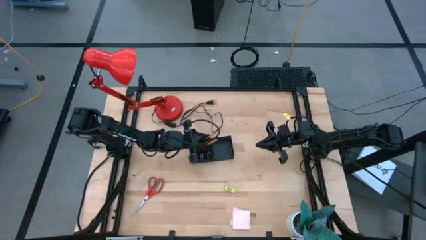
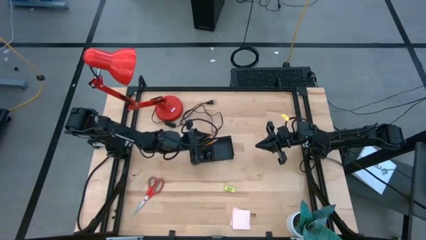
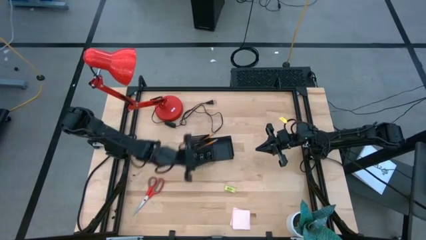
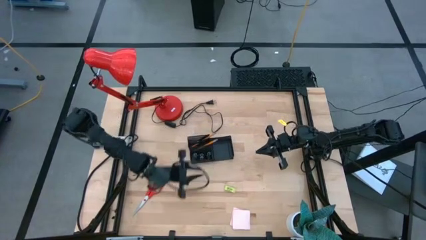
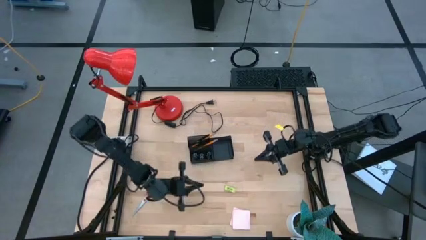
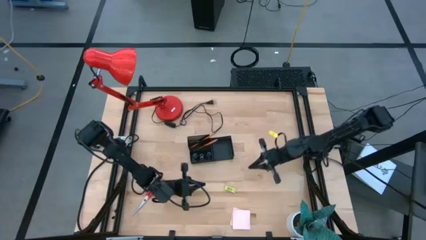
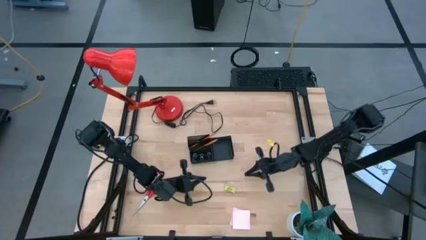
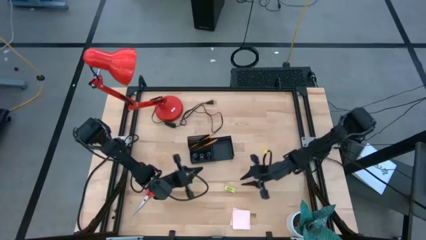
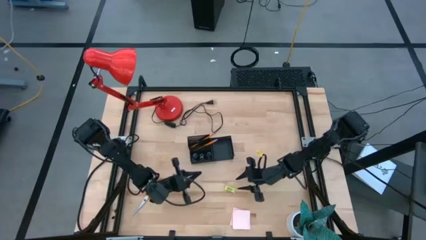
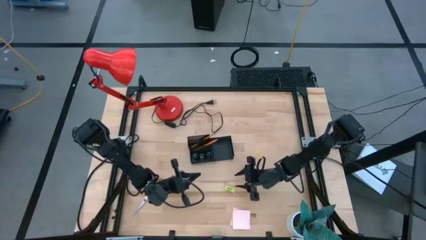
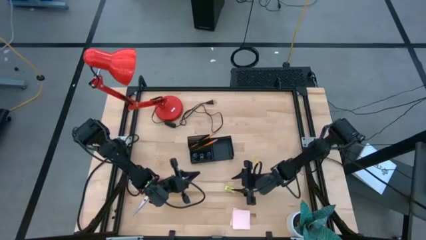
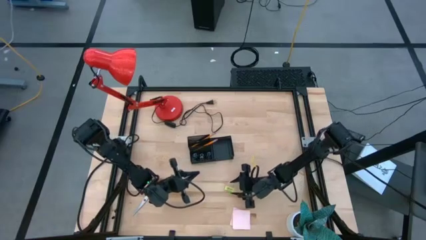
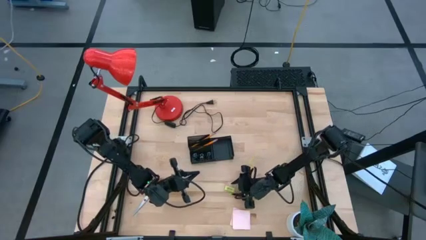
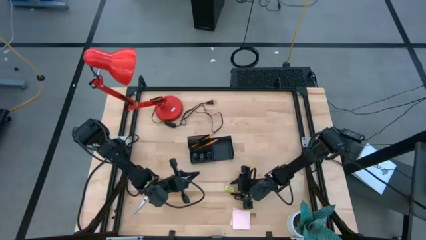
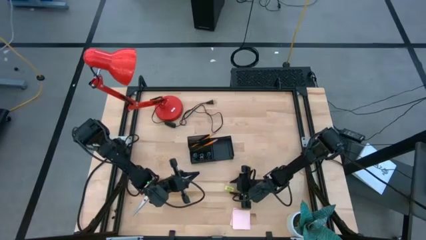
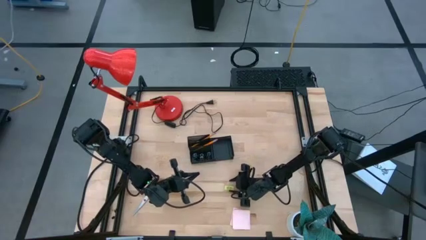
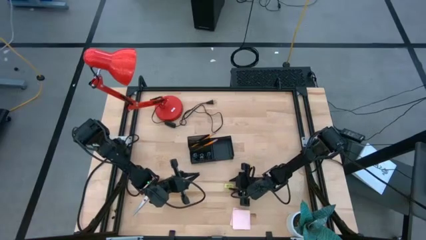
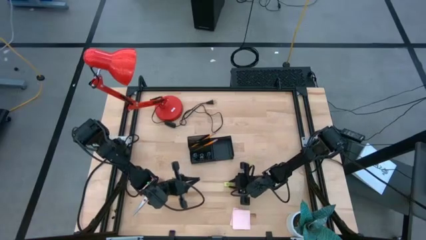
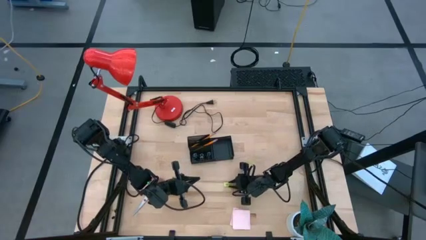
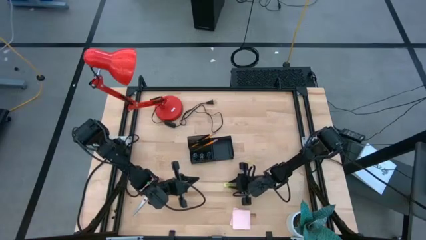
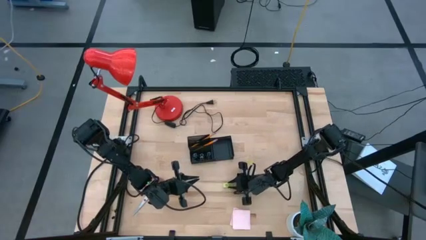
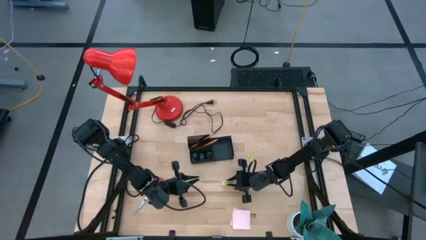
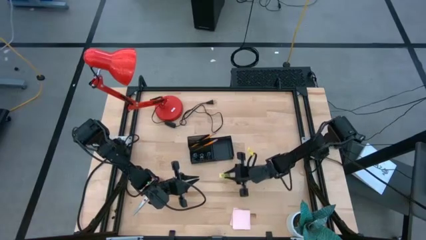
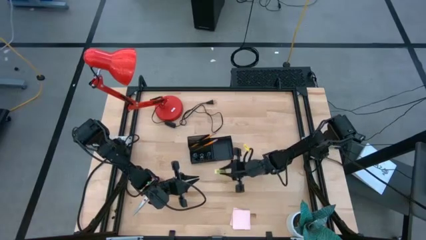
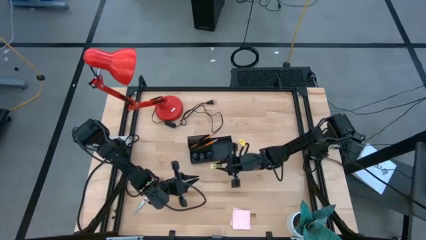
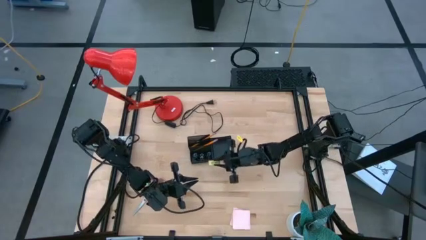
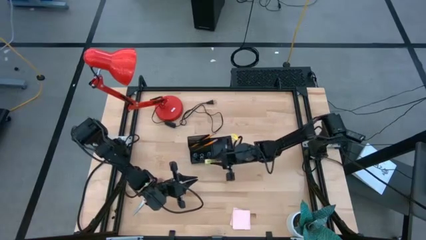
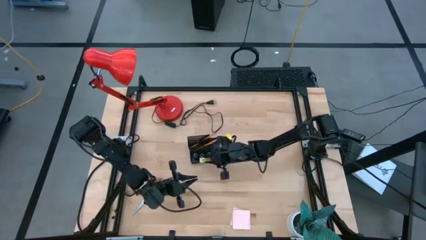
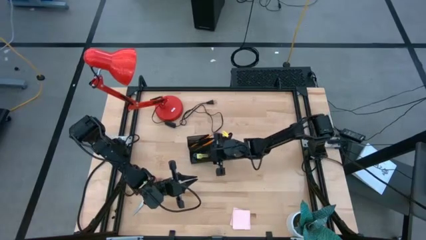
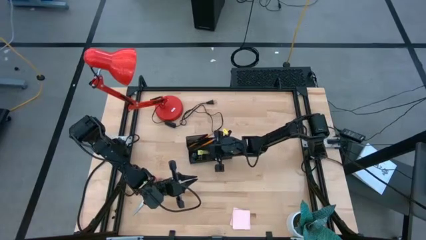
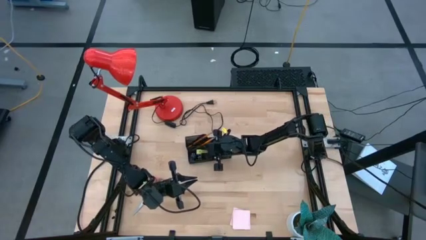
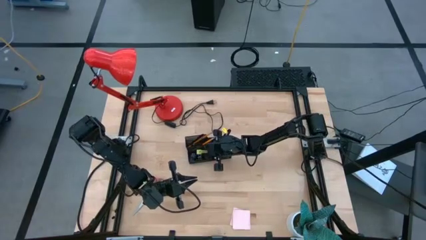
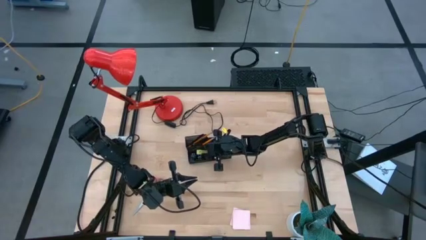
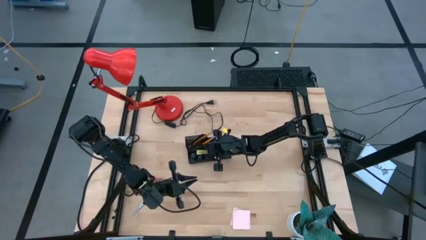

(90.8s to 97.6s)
Task: Pick and place office supplies into organizer
Put the green eraser into the desk organizer

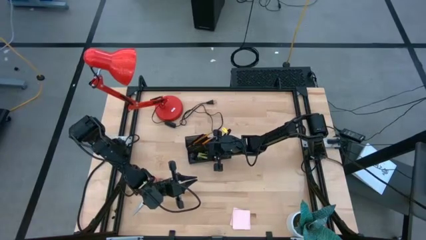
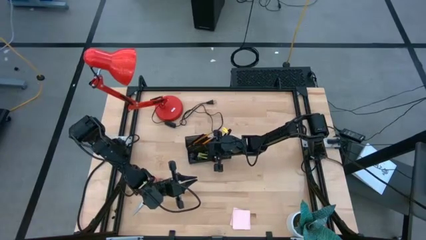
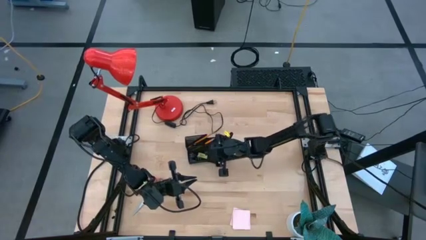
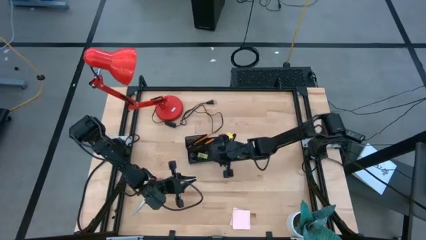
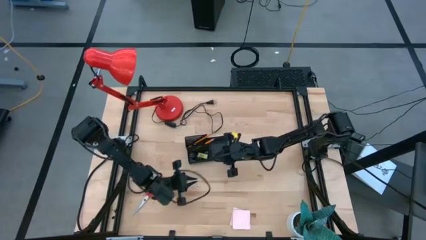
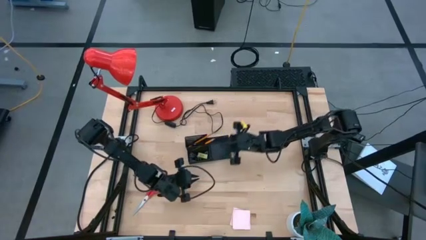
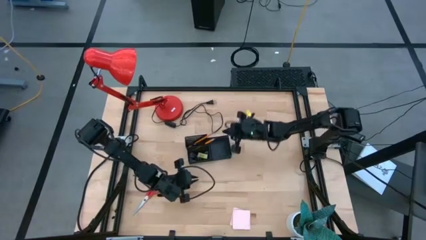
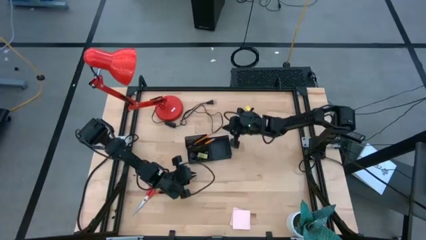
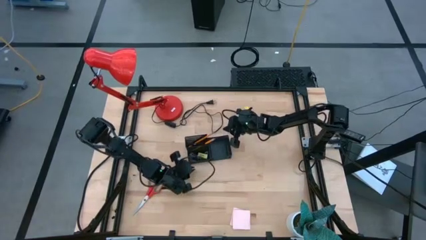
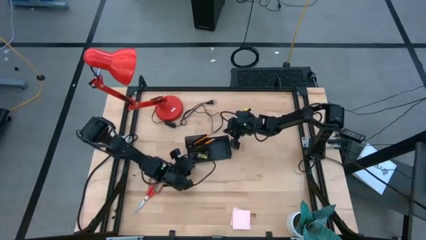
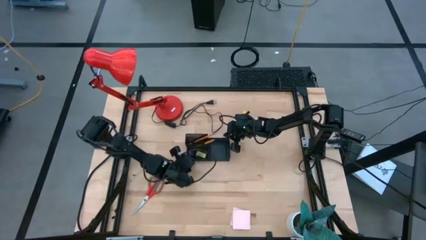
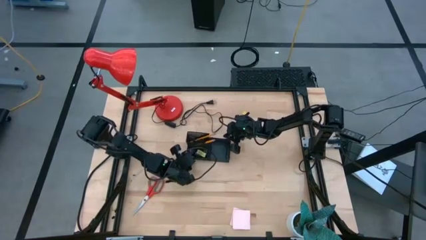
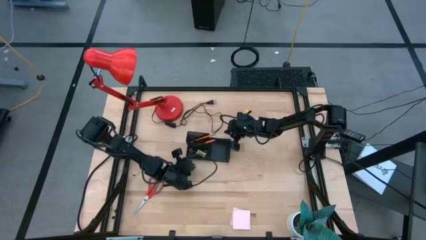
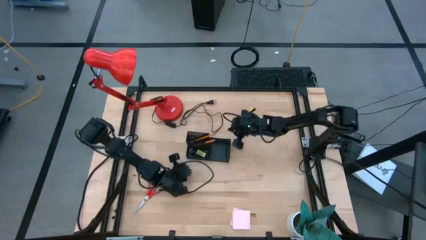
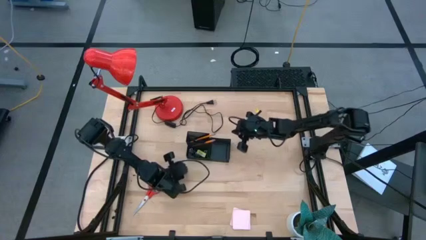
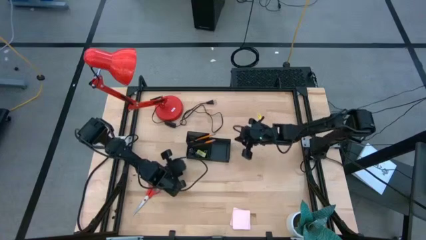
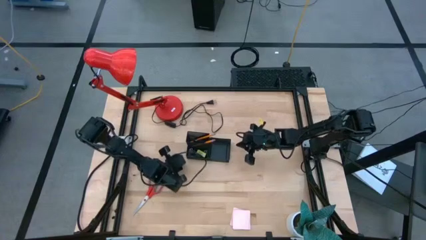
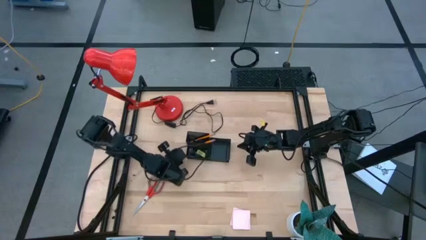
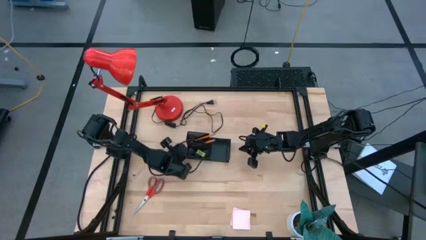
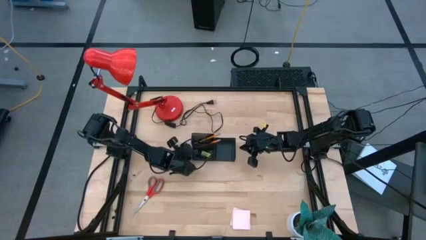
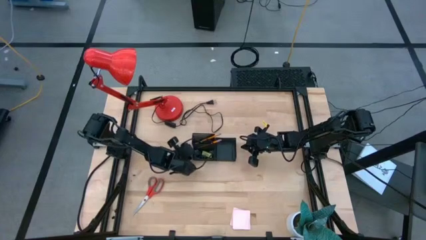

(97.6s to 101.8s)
Adjust the desk organizer

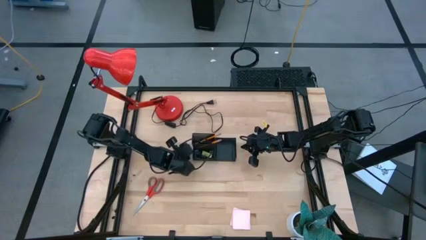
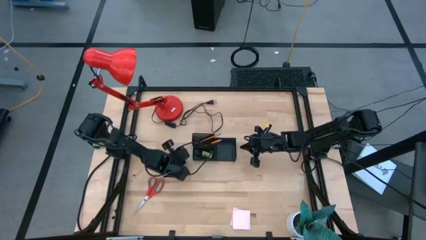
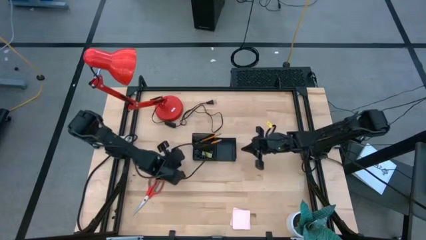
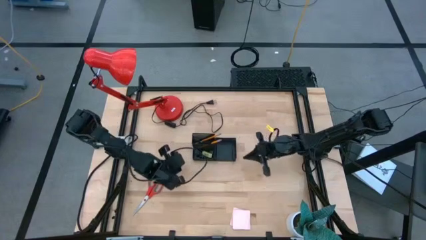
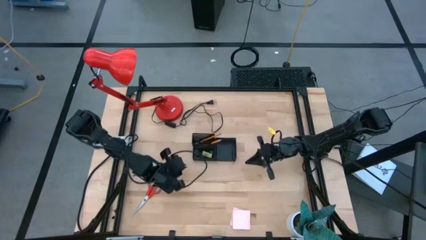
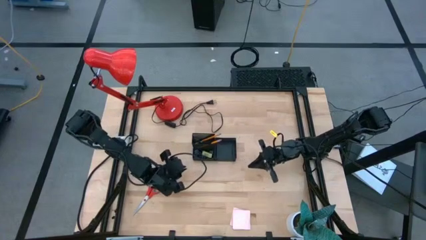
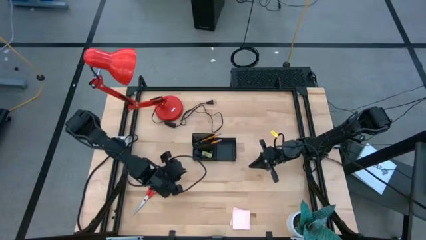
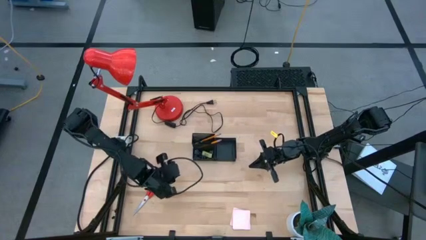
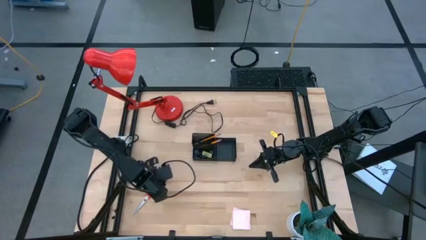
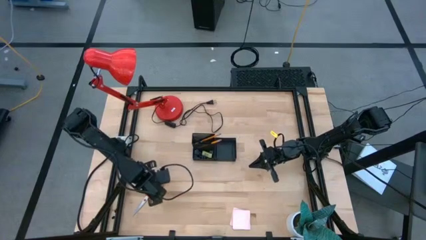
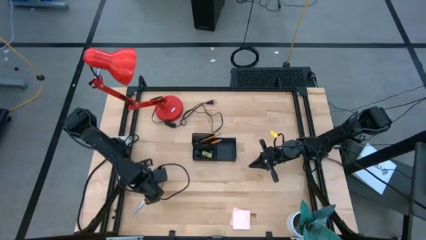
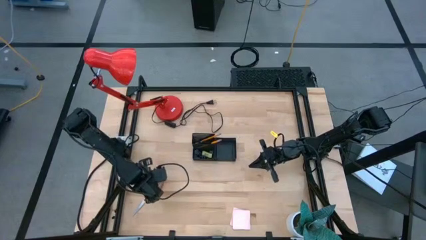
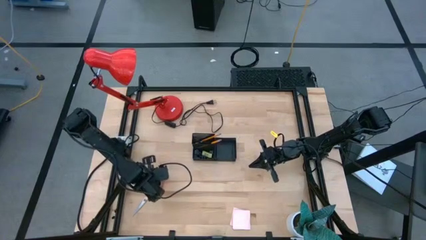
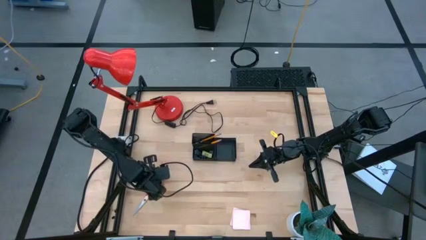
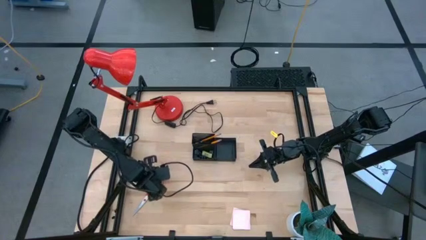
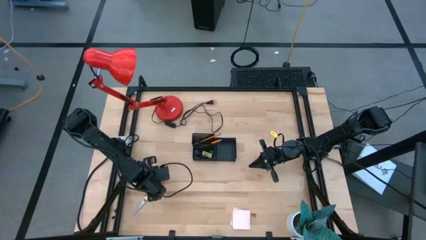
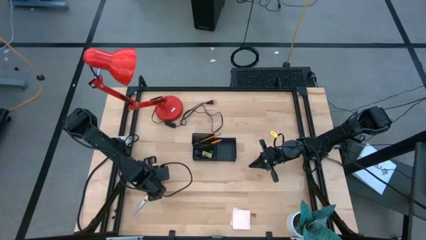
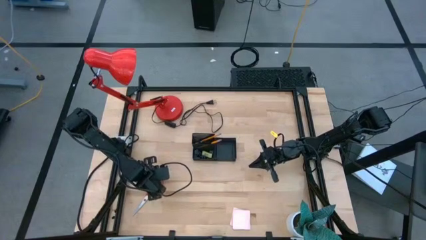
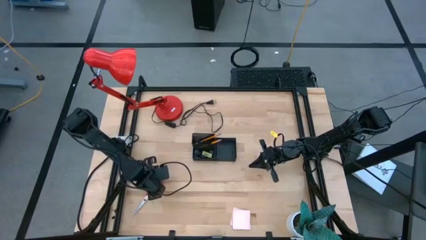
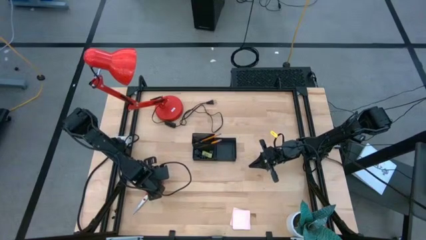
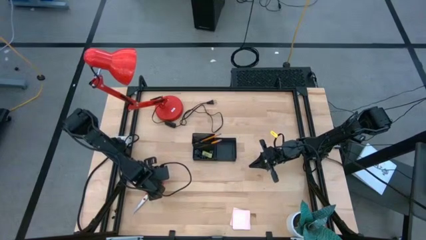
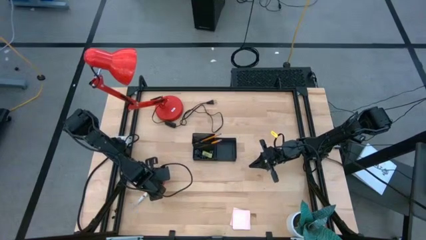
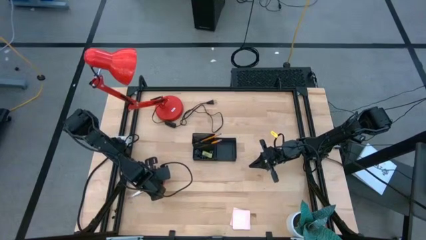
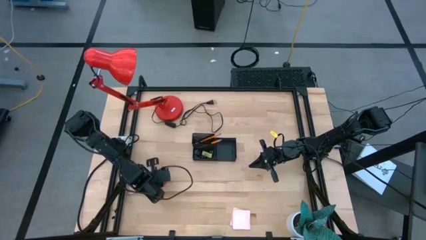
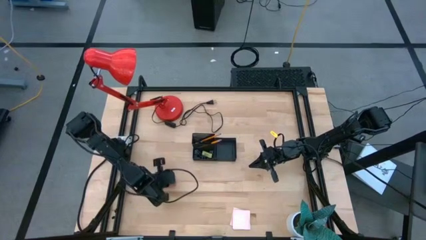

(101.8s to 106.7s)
Put the red scissors into the desk organizer
